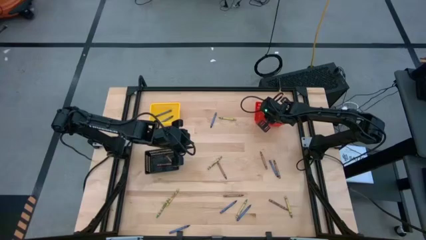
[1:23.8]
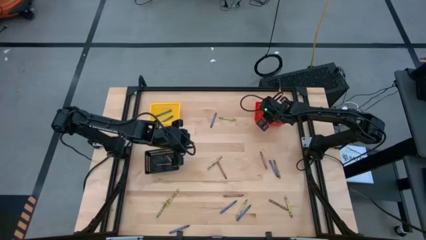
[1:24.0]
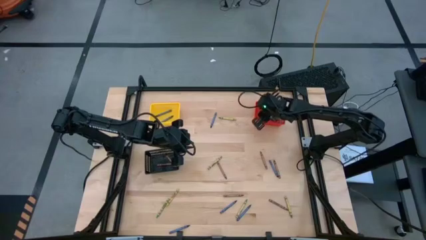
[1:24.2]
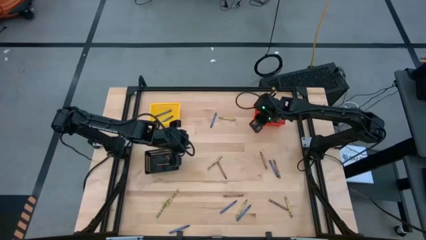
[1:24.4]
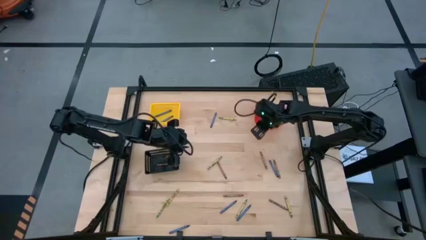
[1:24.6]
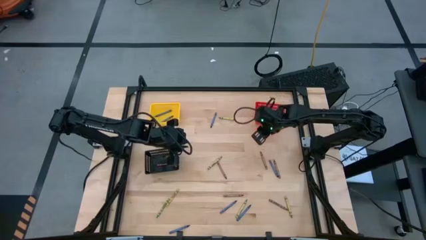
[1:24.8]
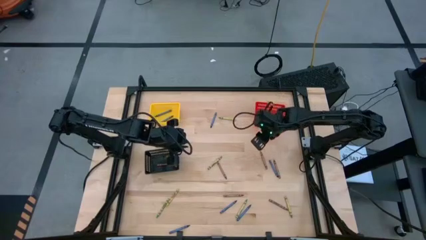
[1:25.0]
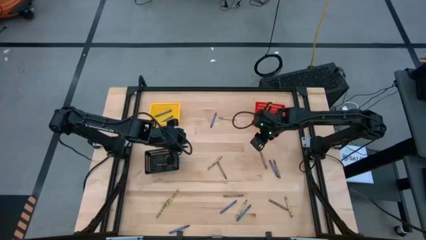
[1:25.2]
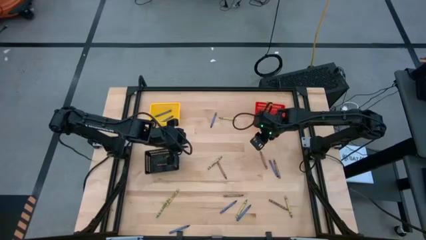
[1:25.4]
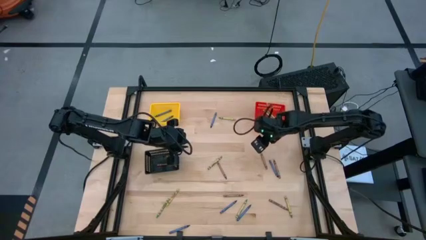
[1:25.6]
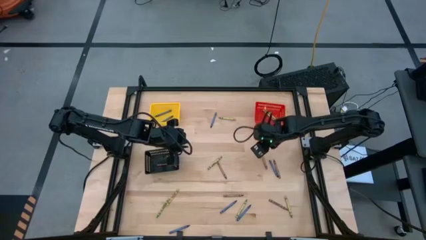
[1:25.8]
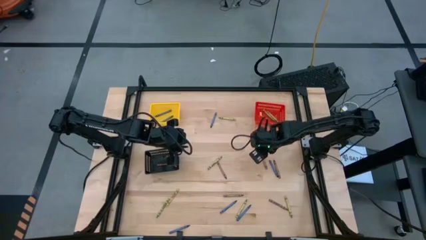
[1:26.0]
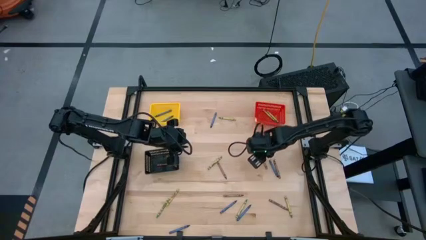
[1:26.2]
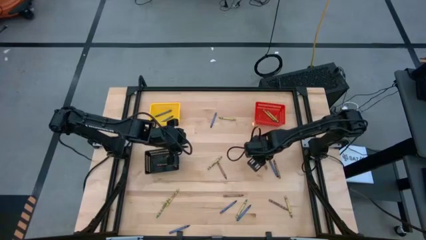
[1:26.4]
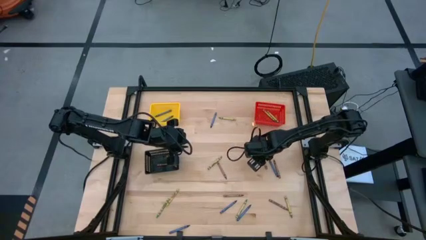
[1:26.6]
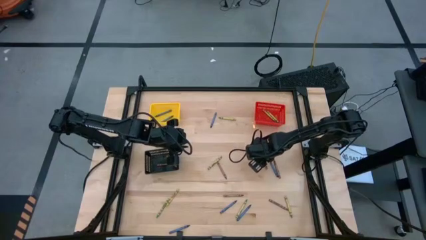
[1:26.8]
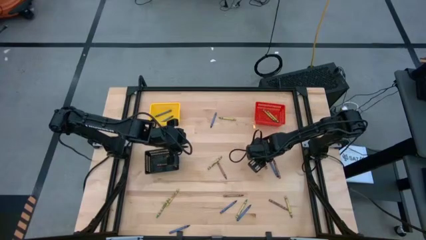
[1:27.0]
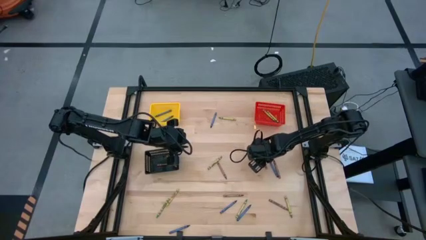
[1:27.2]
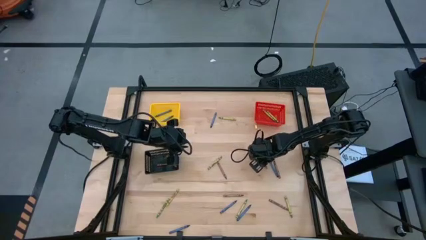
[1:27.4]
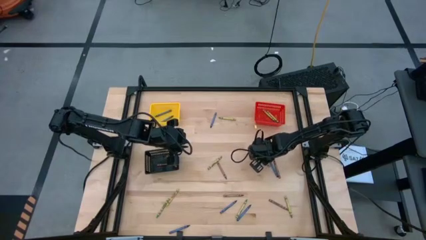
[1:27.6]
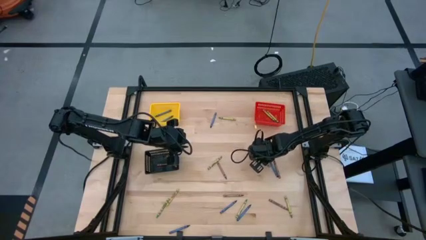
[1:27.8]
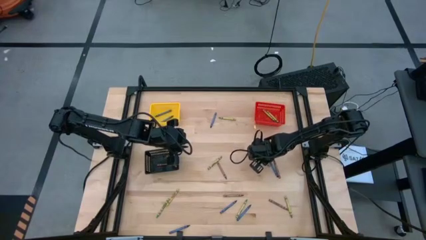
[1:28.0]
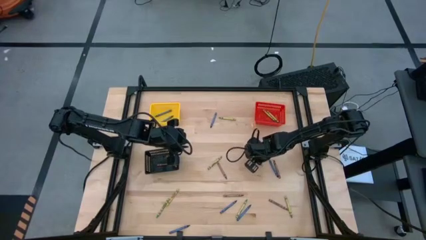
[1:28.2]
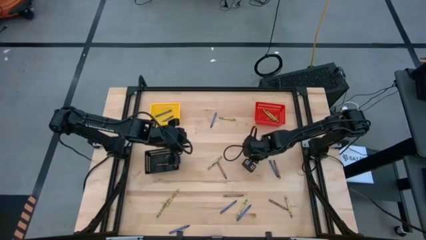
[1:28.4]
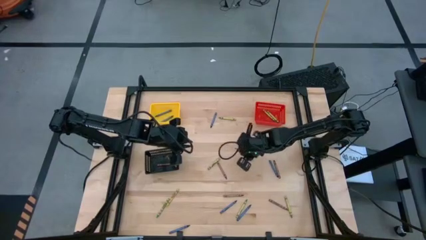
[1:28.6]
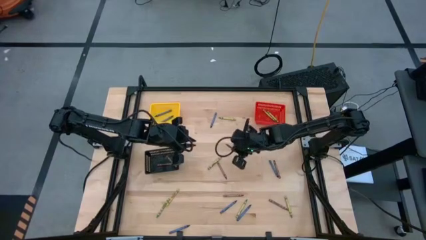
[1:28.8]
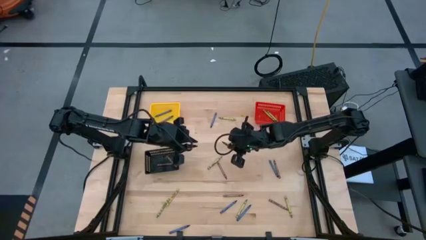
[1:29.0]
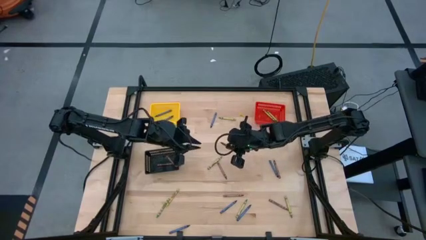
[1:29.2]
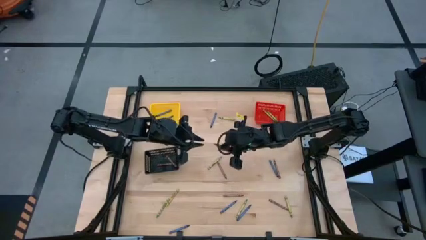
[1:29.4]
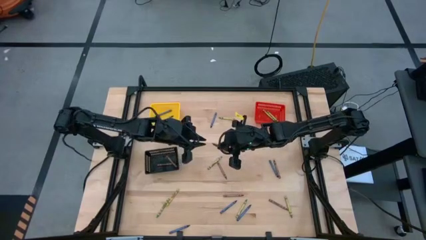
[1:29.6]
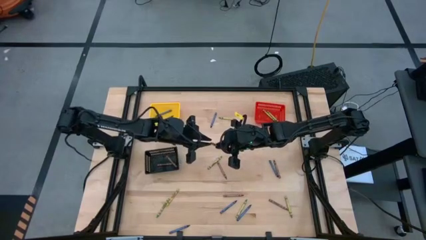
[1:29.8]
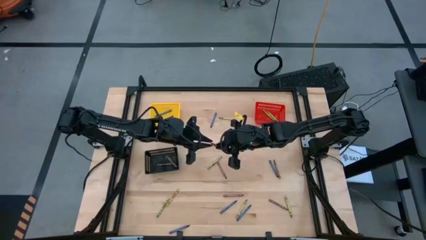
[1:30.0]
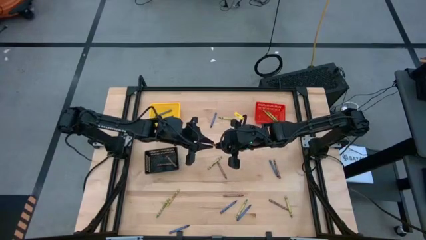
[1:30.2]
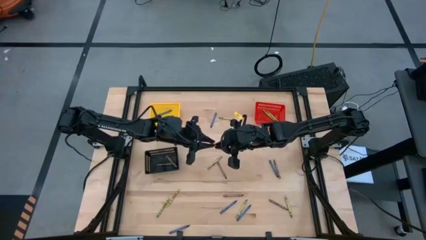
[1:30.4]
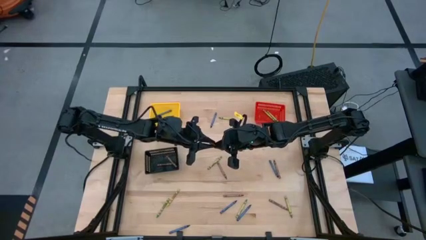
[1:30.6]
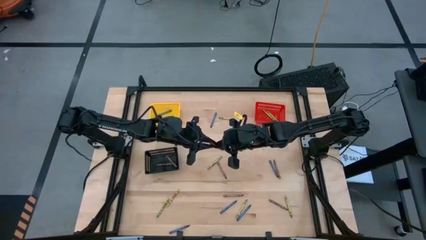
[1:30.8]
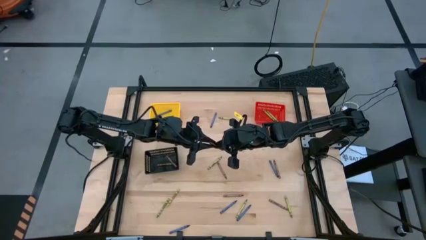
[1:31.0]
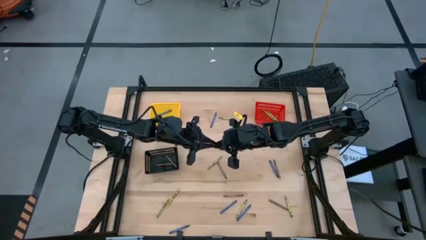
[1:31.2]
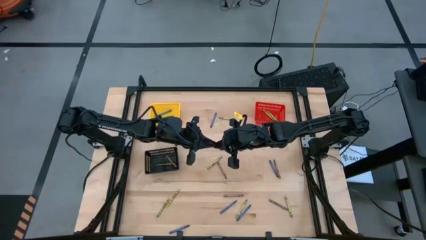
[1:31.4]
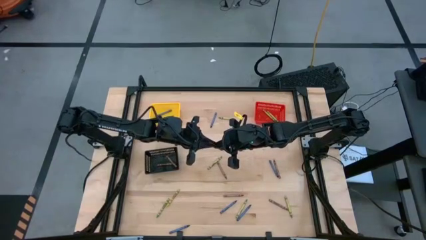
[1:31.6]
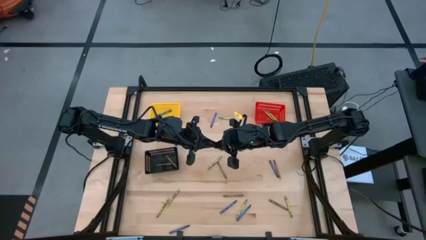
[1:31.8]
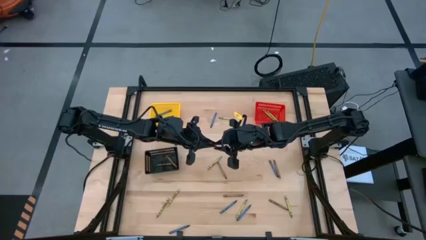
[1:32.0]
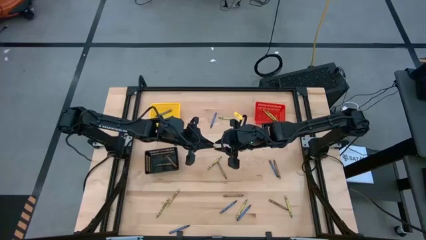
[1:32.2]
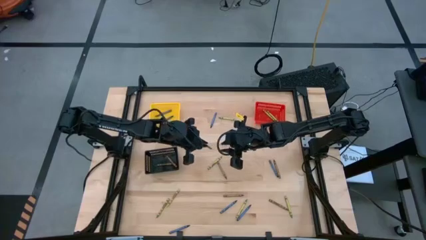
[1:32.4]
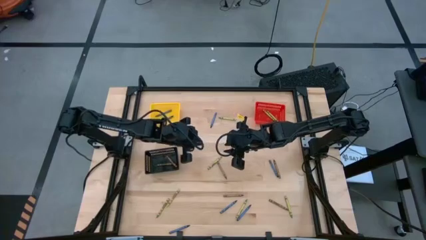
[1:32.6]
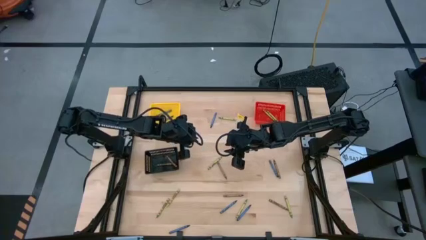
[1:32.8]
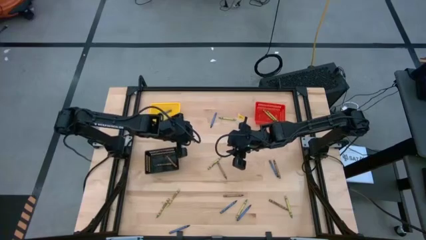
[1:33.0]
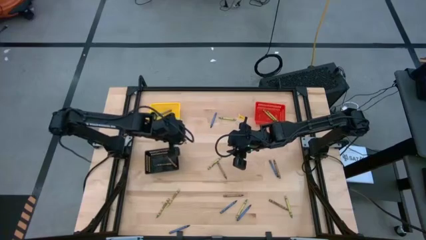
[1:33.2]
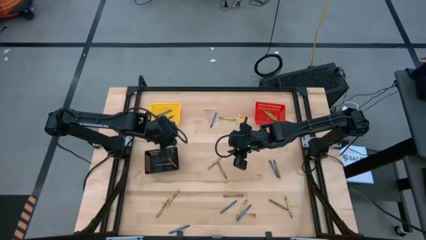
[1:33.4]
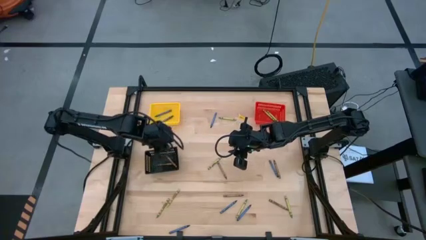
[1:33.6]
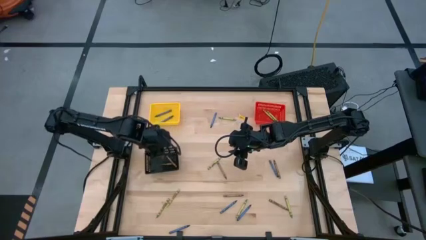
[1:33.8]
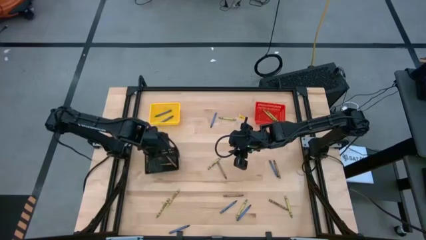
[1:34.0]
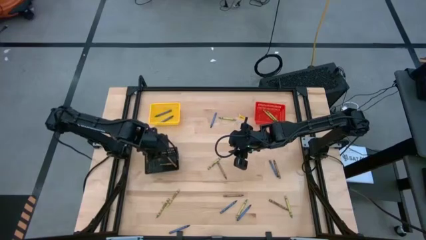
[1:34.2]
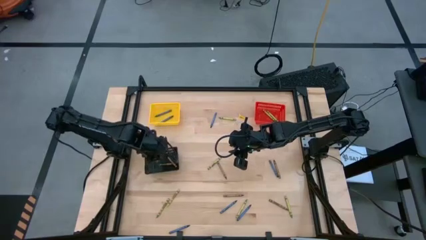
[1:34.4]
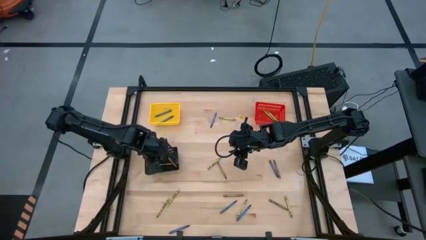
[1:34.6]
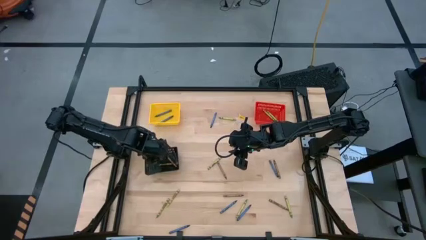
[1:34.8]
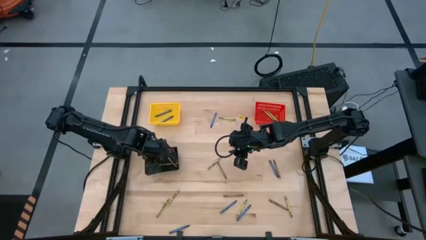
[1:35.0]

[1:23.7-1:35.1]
Task: Sort crayons
Put the brown crayon into the black bin
